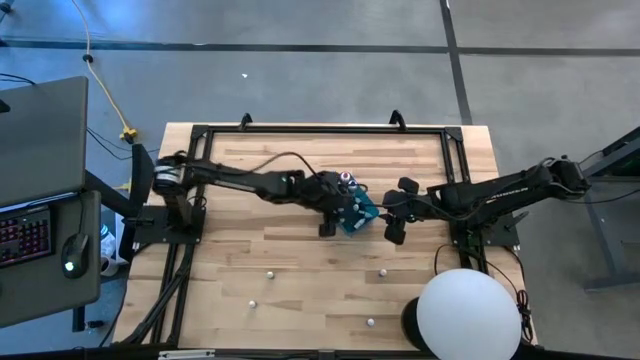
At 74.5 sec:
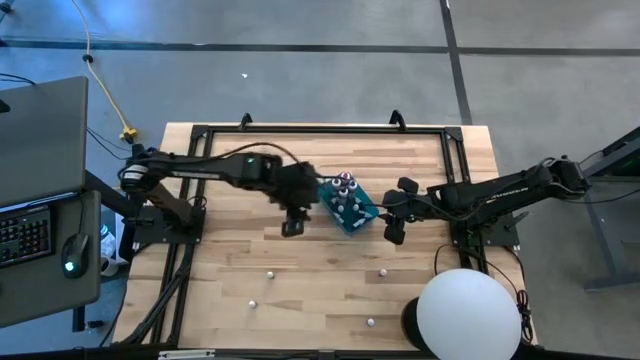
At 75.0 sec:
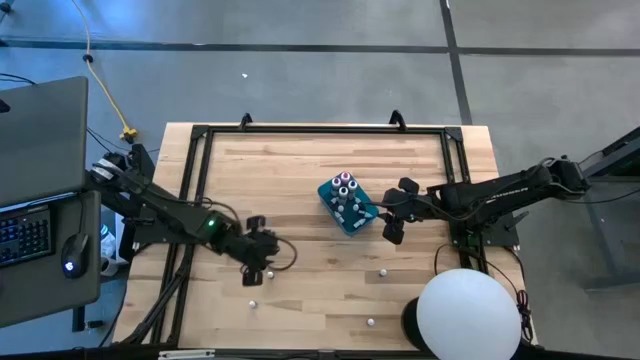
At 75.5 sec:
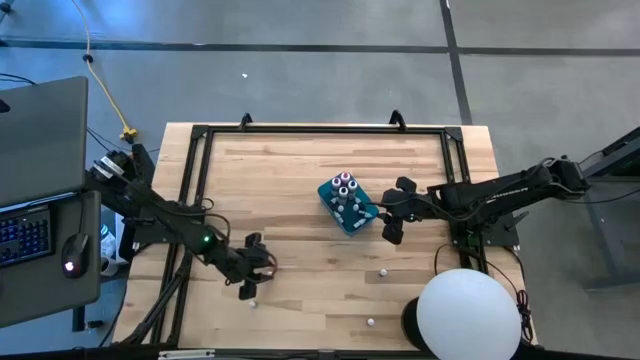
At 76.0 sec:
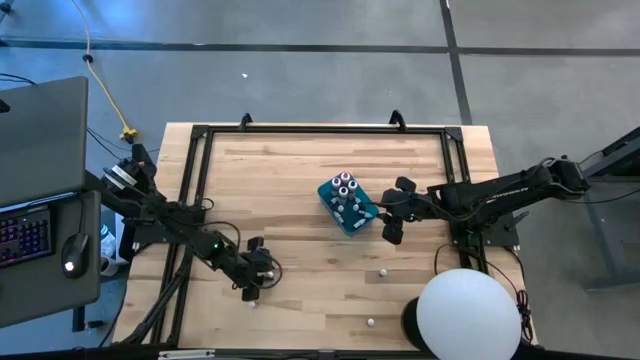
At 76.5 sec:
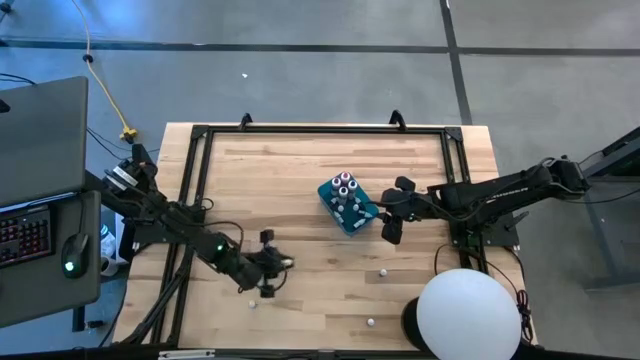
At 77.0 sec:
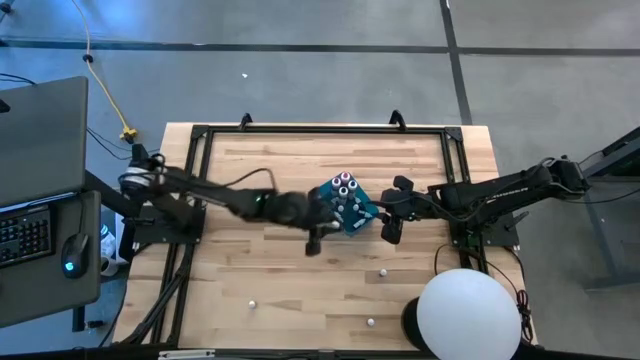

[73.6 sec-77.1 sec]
Task: Pick & Place food coloring
Put the small black food coloring bottle into the blue container

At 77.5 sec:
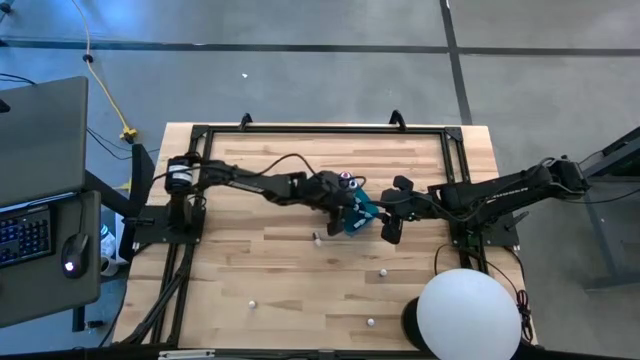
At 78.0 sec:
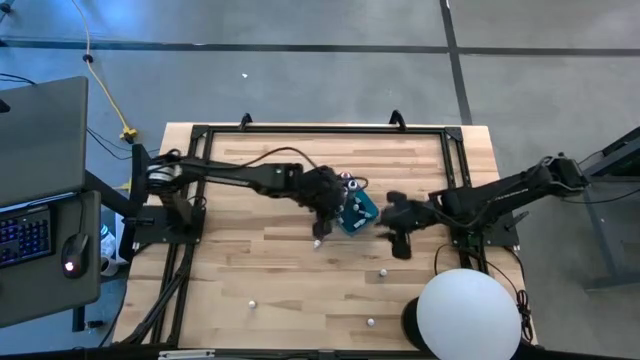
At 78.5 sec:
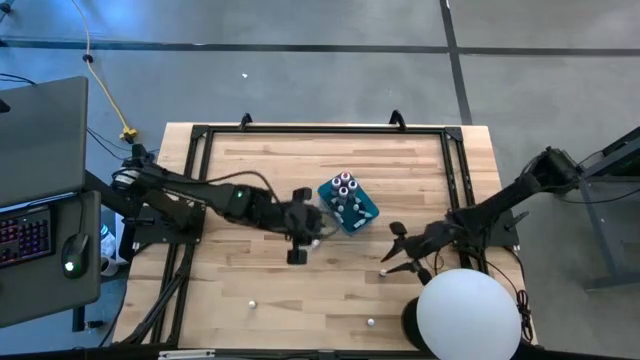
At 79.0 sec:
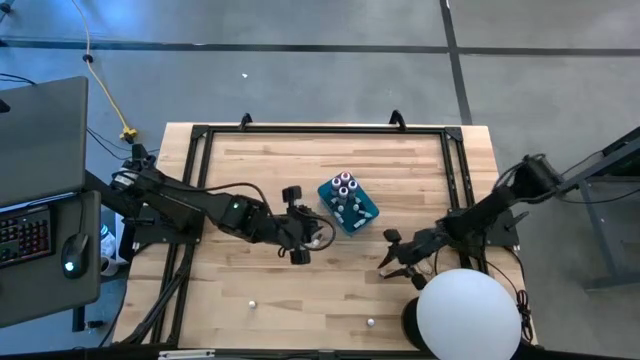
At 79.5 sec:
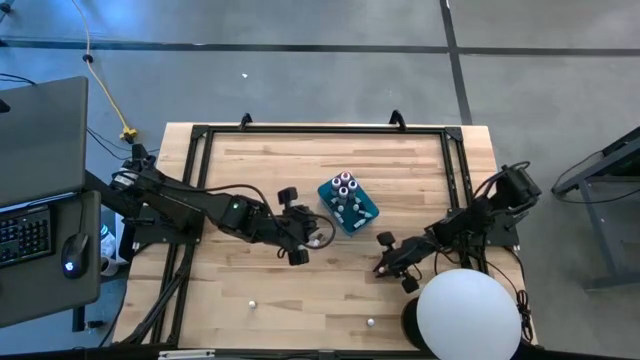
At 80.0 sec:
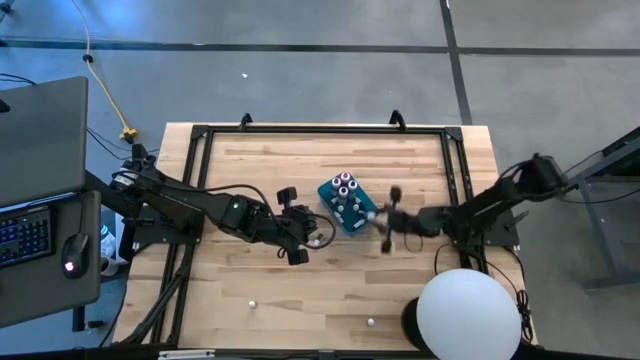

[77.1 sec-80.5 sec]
Put the small black food coloring bottle into the blue container

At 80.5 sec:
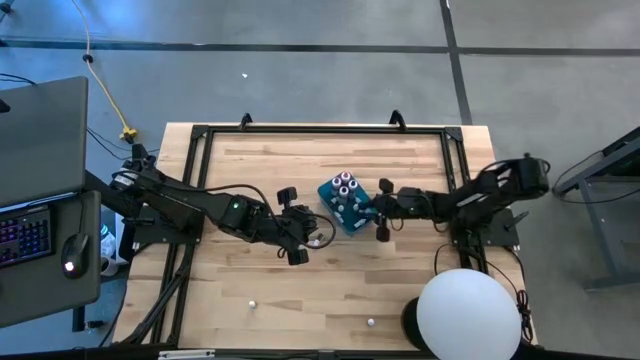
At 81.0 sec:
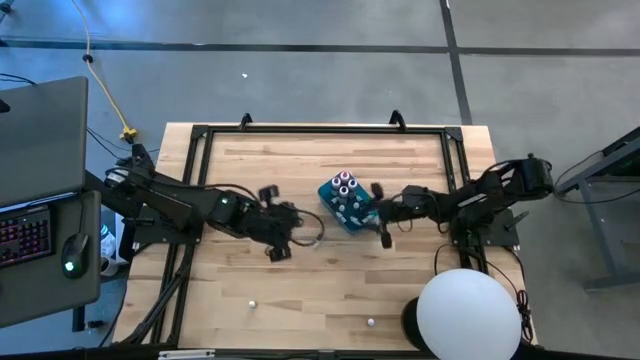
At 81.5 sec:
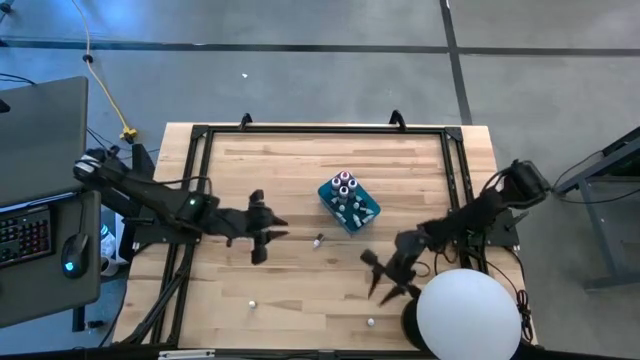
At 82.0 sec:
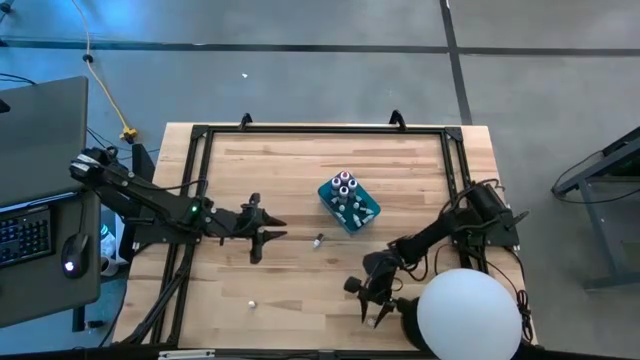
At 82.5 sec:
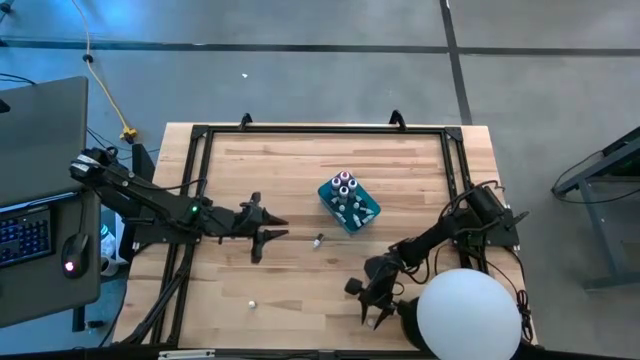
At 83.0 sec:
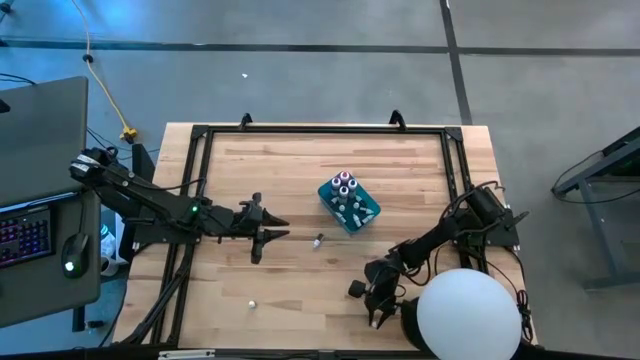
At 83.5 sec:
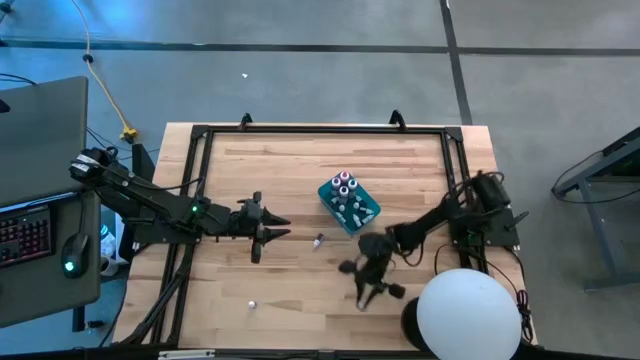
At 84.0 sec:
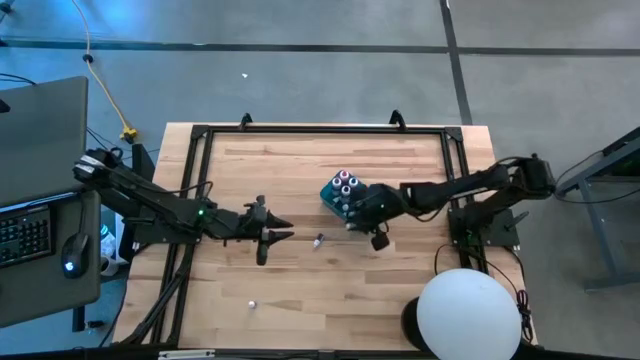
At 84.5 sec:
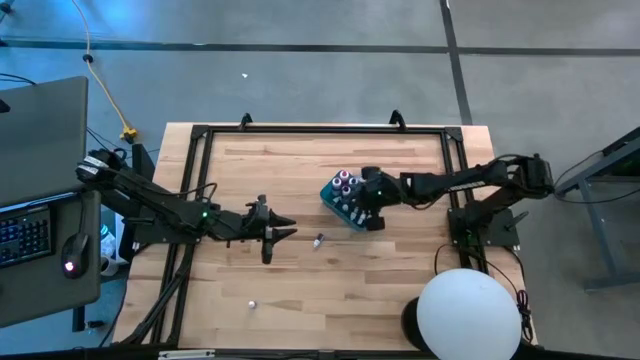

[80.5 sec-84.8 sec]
Put the small black food coloring bottle into the blue container

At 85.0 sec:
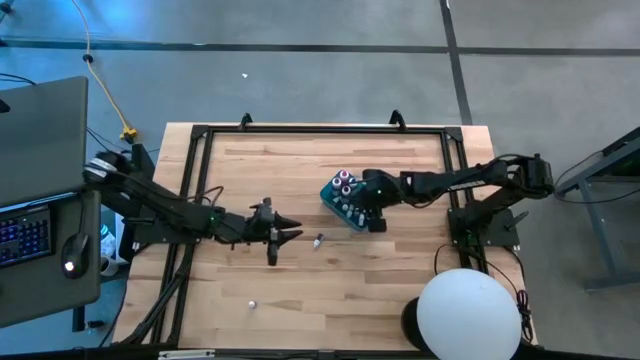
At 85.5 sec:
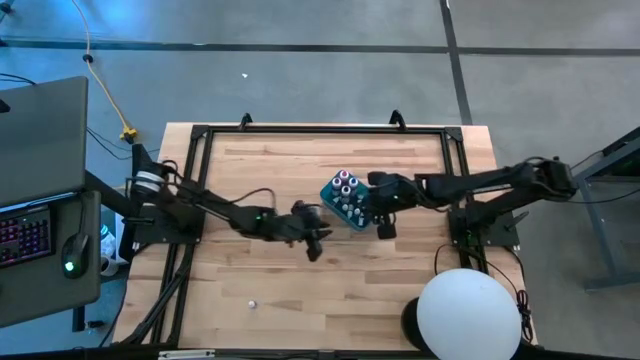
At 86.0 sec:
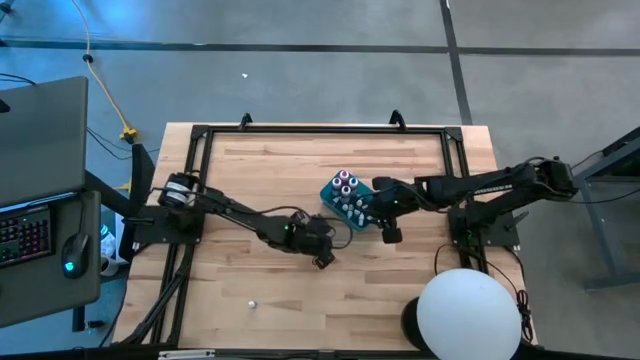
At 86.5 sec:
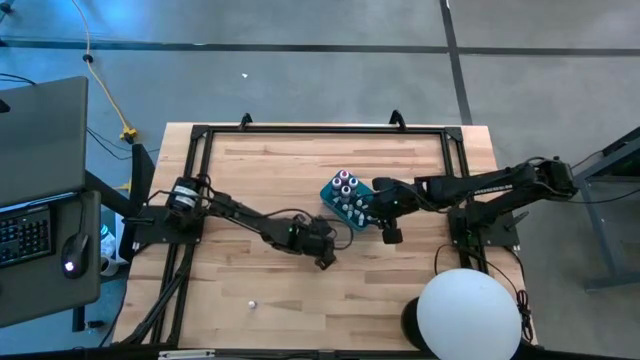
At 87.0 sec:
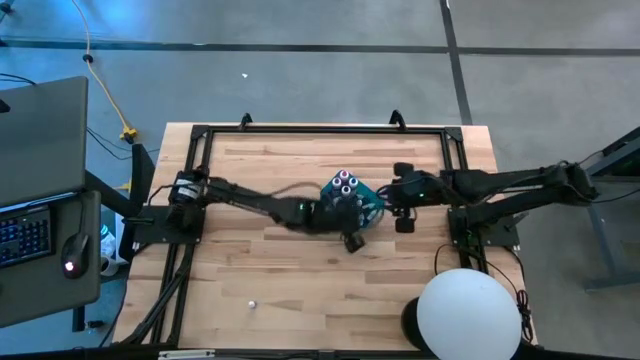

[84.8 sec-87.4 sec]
Put the small black food coloring bottle into the blue container

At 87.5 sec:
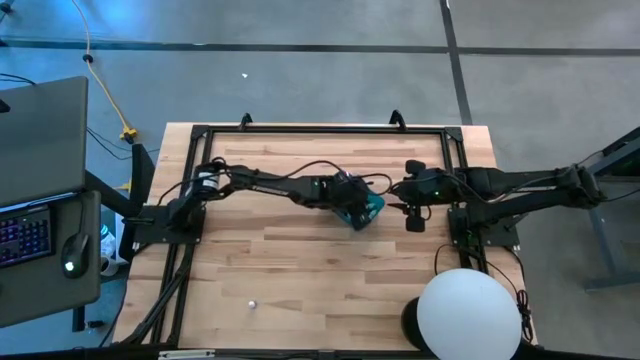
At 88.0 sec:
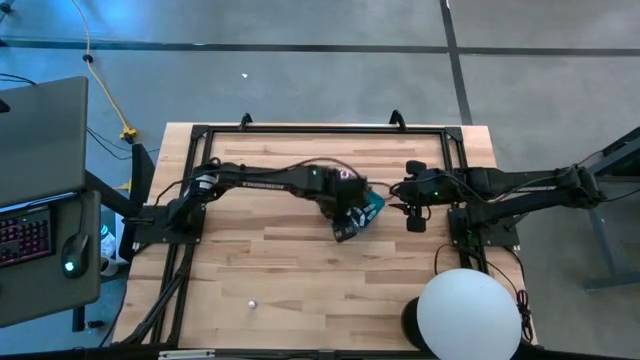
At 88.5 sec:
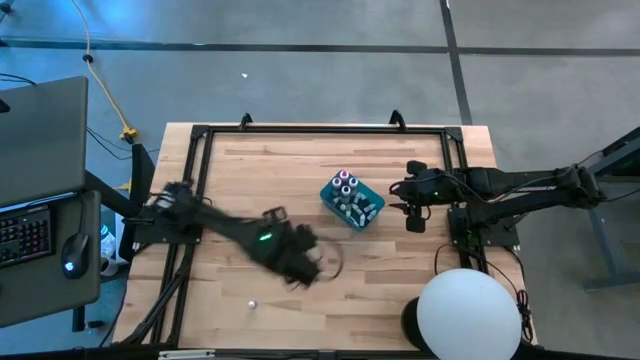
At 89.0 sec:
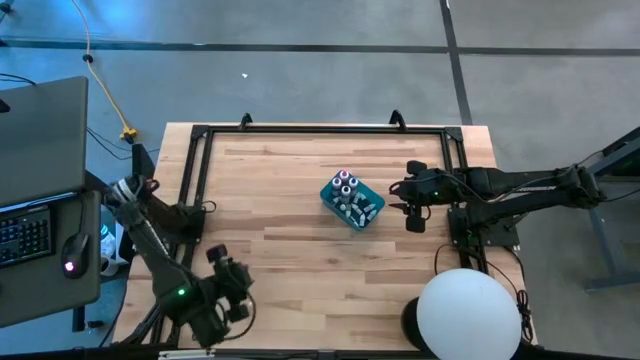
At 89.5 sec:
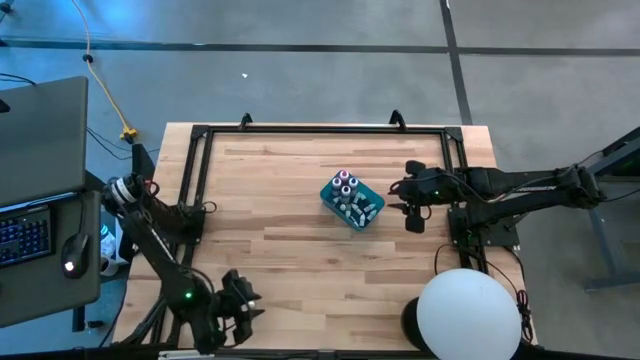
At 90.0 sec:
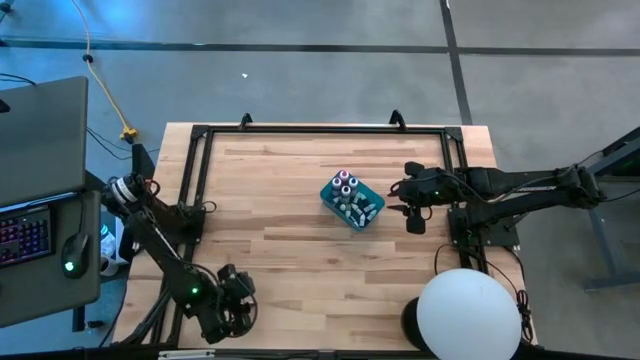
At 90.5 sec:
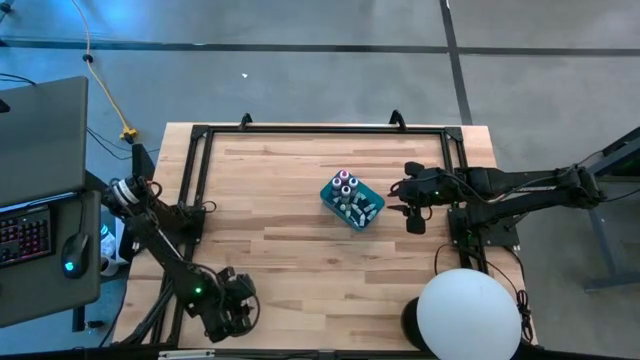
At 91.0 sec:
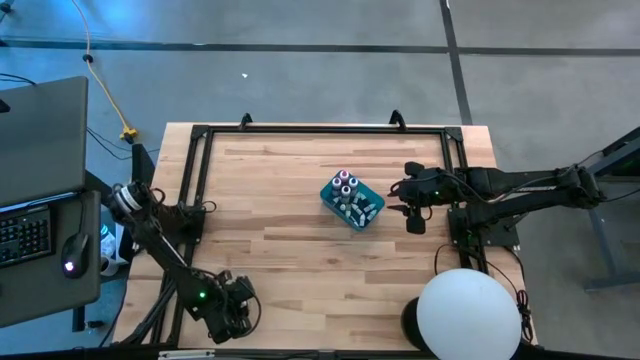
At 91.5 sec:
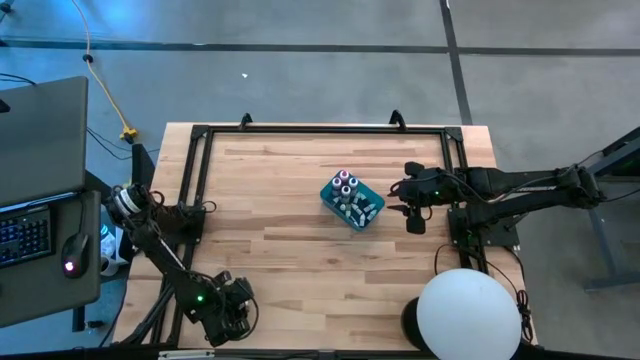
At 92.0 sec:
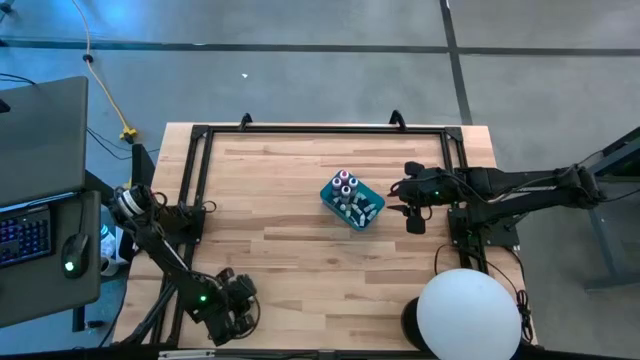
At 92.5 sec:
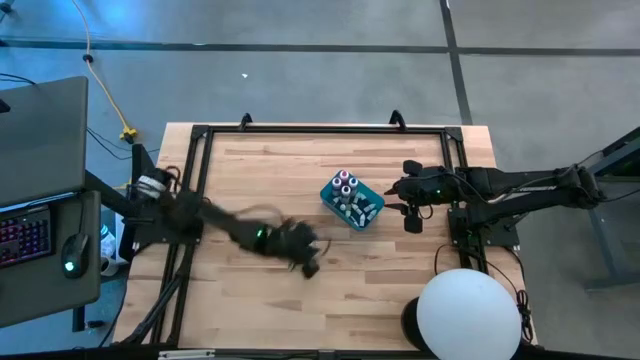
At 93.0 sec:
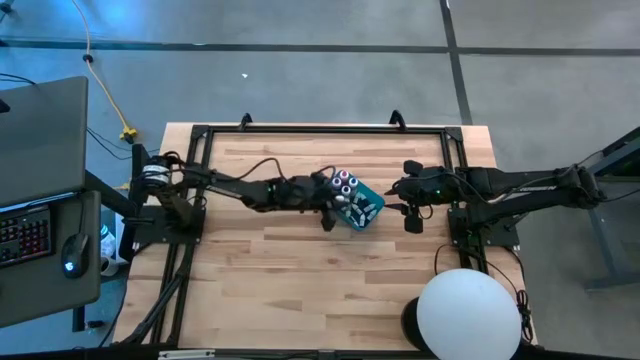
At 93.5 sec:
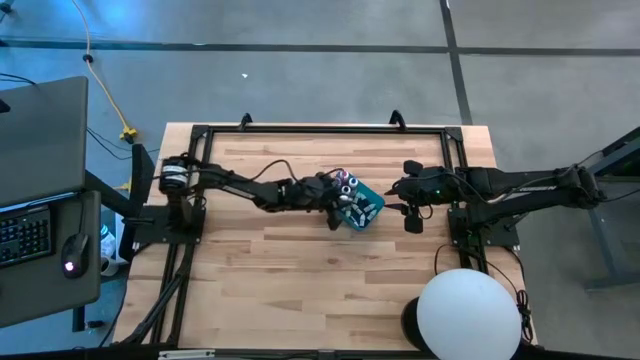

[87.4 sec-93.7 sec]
Put the small black food coloring bottle into the blue container

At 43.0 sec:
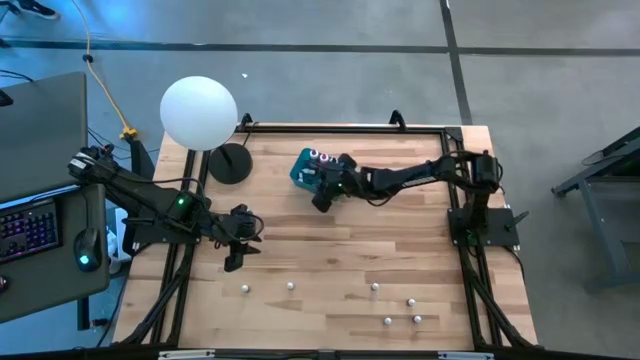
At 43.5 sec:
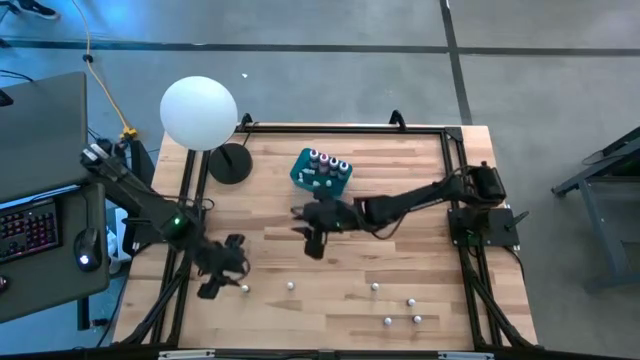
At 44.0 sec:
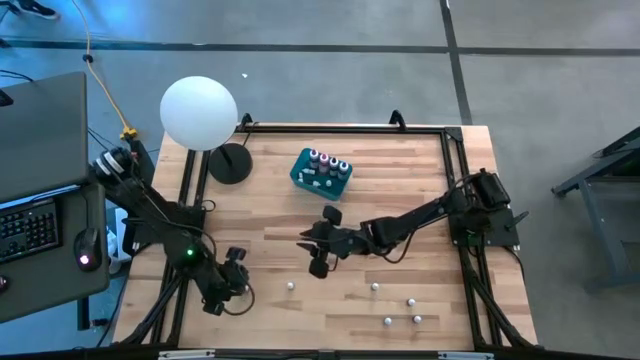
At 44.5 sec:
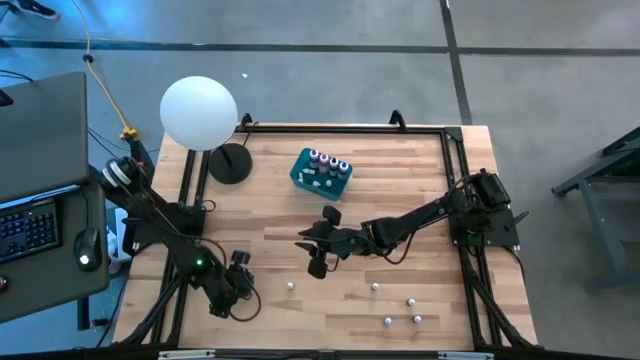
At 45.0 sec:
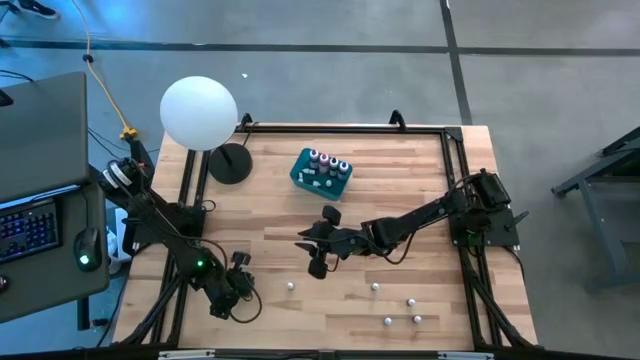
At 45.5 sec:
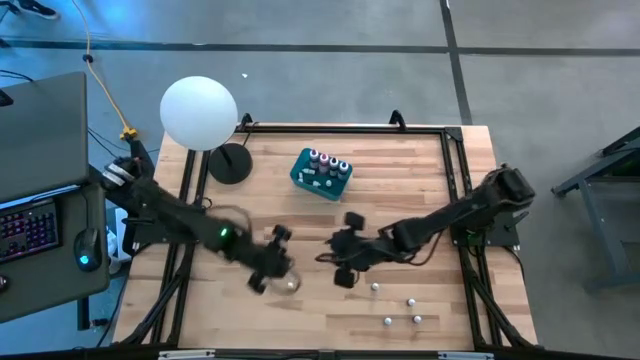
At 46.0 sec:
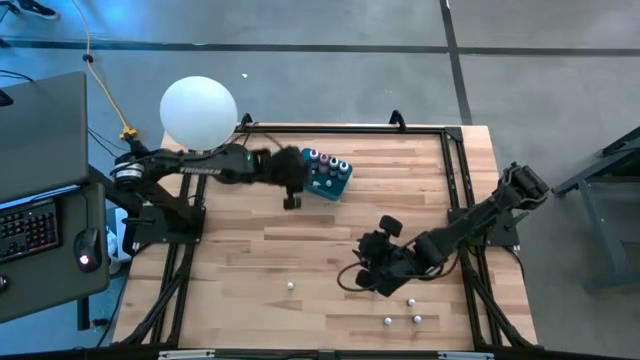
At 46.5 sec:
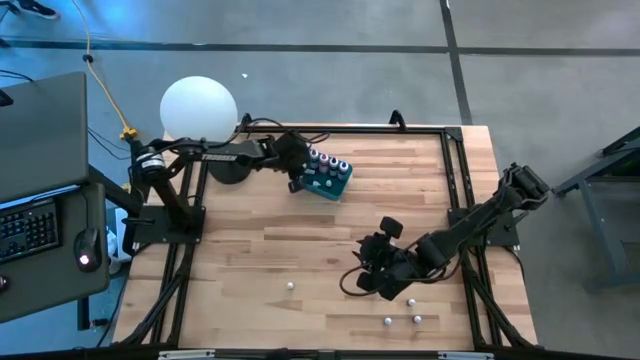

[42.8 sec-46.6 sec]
Task: Pick & Place food coloring
Put the red food coloring bottle into the blue bin
